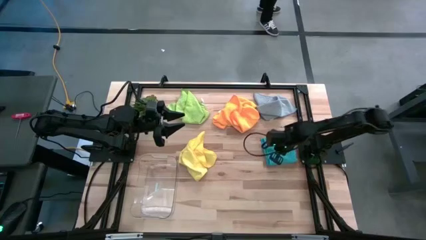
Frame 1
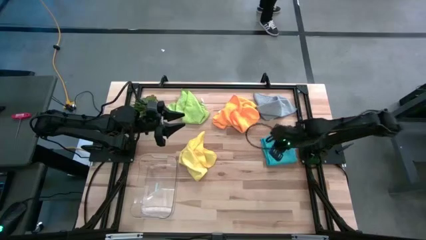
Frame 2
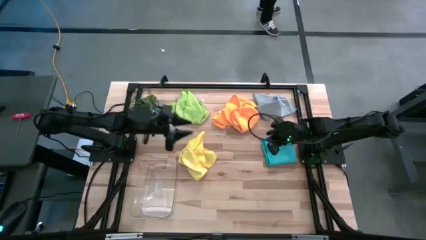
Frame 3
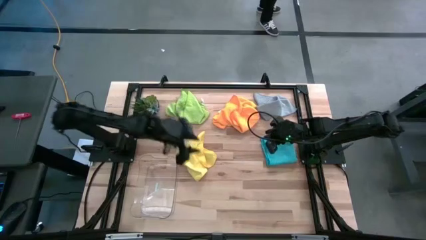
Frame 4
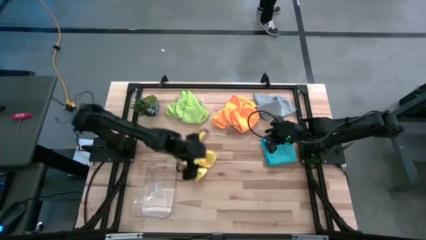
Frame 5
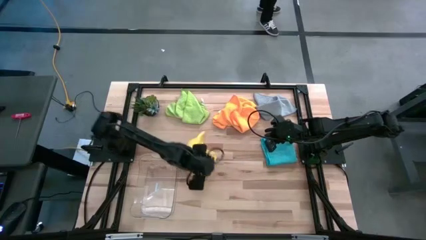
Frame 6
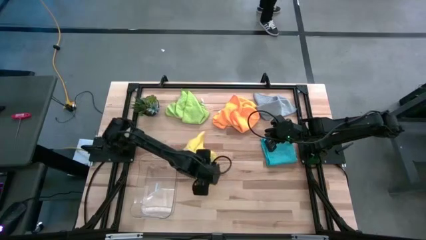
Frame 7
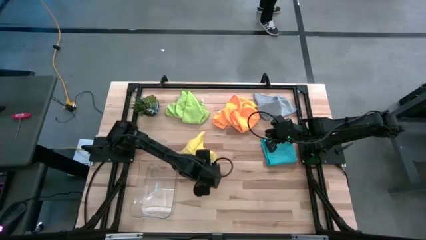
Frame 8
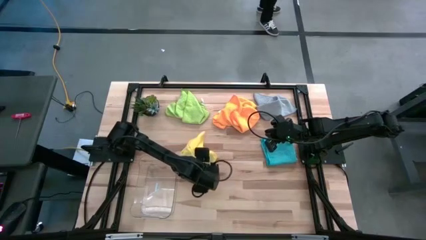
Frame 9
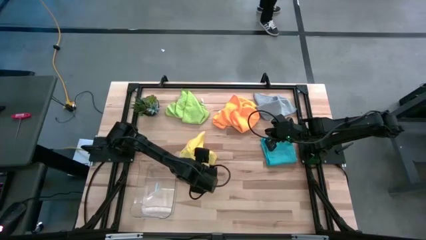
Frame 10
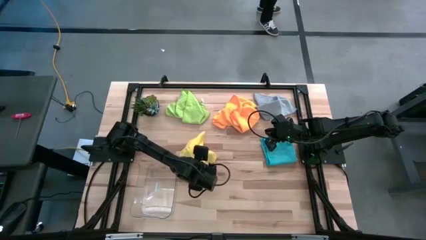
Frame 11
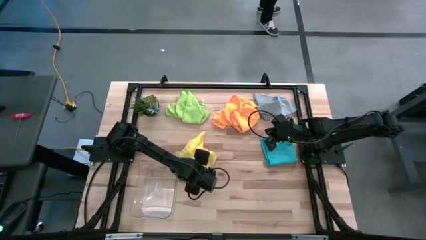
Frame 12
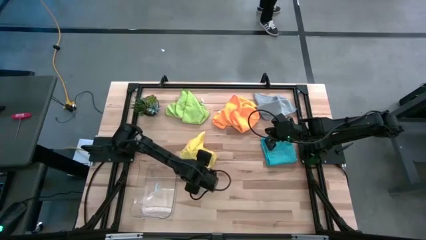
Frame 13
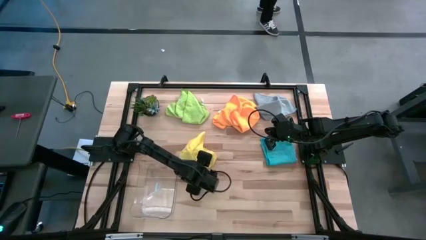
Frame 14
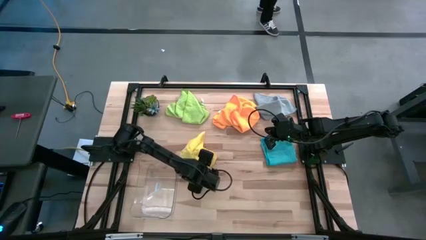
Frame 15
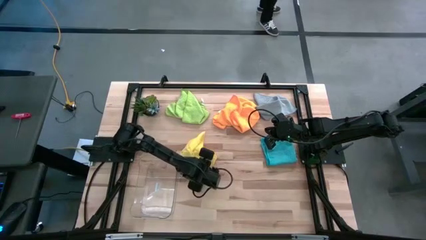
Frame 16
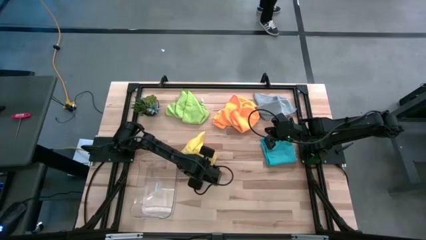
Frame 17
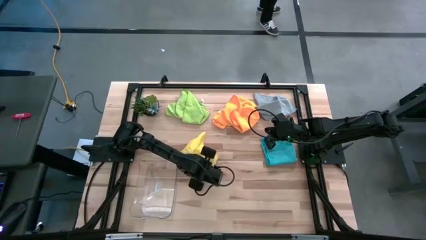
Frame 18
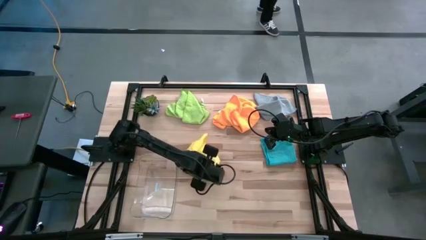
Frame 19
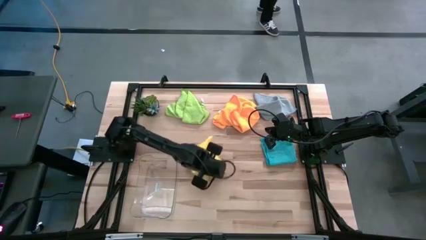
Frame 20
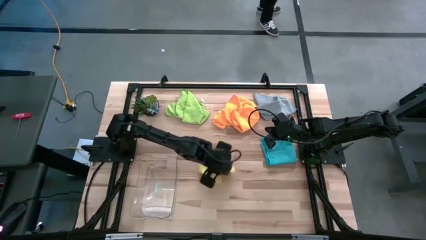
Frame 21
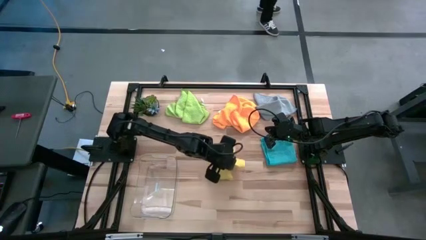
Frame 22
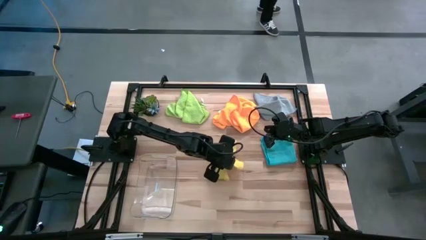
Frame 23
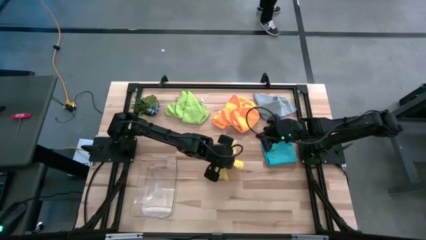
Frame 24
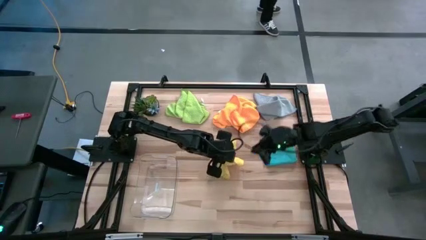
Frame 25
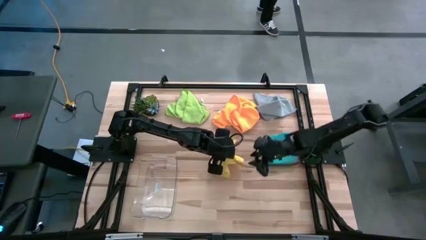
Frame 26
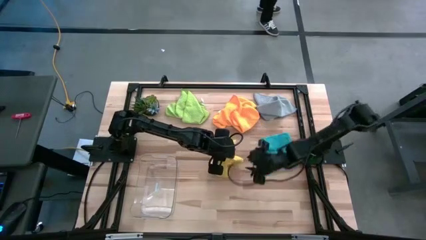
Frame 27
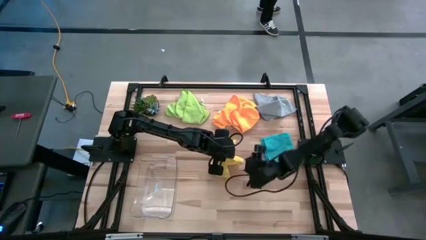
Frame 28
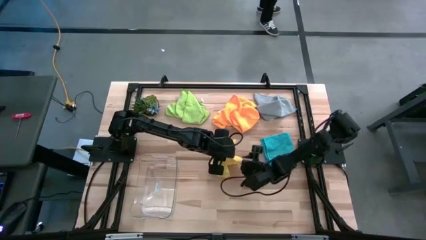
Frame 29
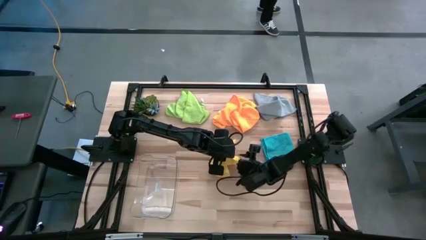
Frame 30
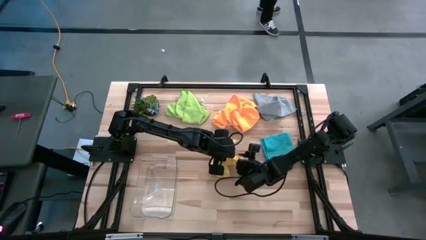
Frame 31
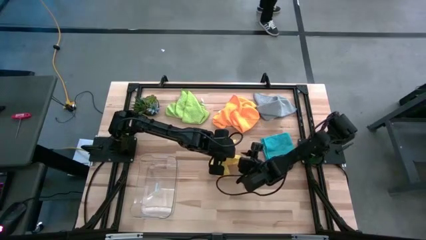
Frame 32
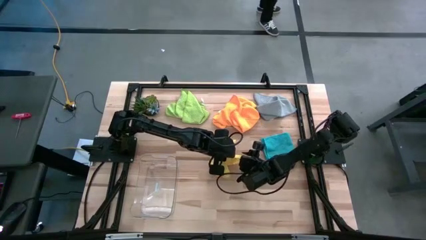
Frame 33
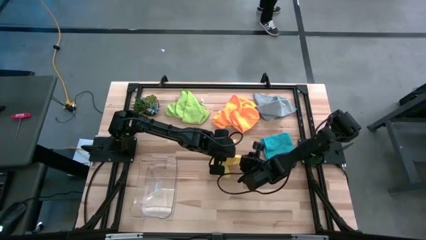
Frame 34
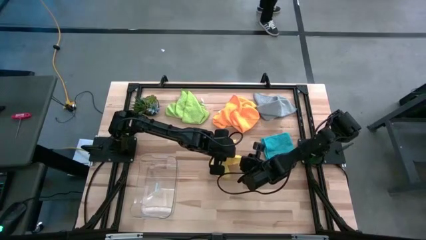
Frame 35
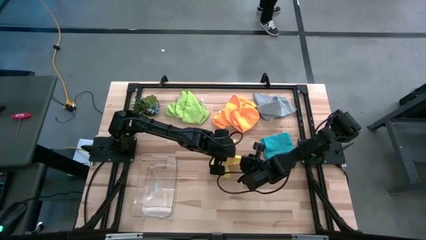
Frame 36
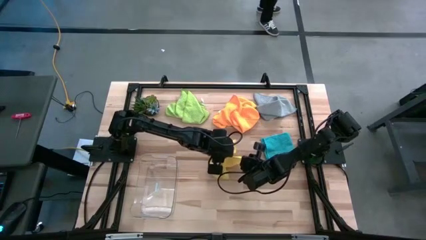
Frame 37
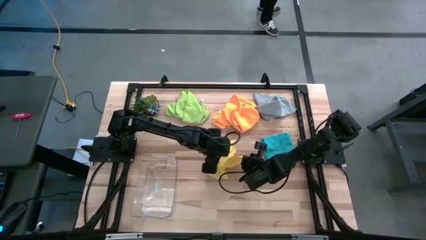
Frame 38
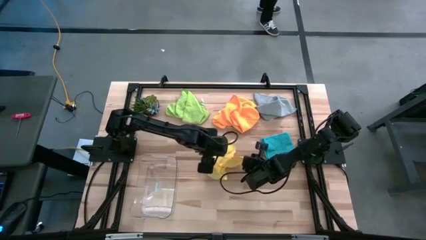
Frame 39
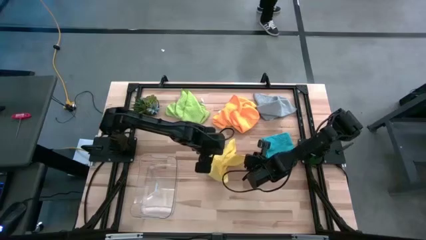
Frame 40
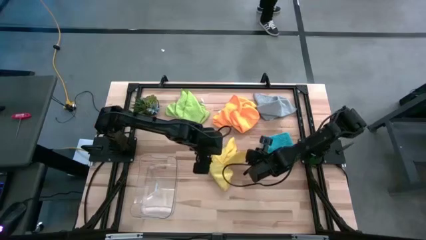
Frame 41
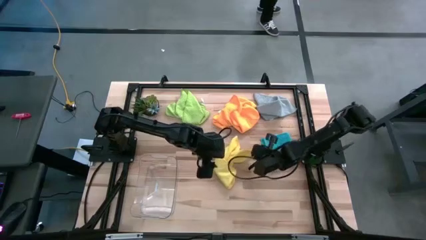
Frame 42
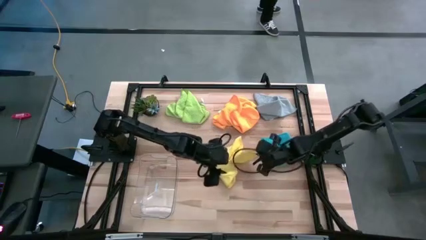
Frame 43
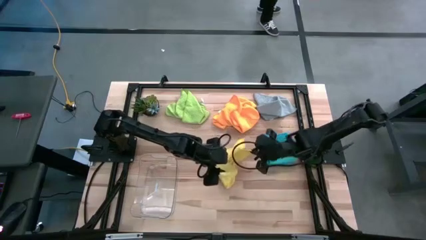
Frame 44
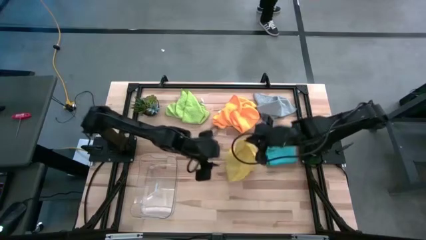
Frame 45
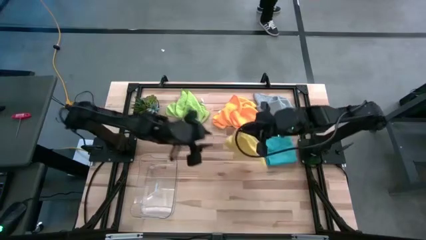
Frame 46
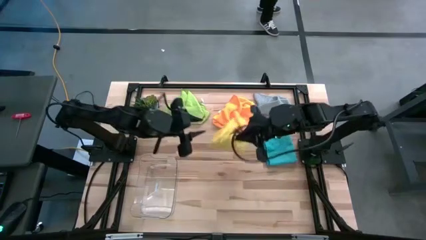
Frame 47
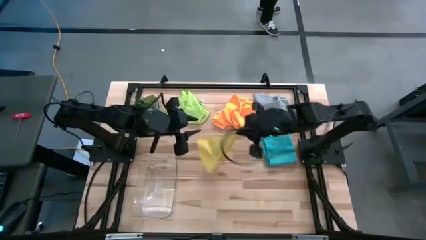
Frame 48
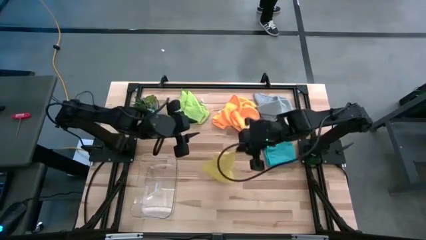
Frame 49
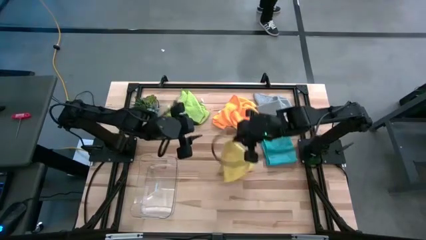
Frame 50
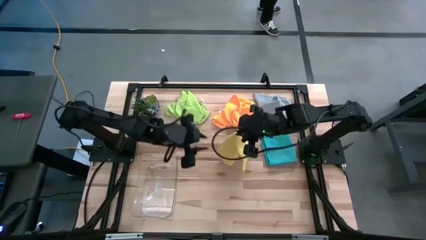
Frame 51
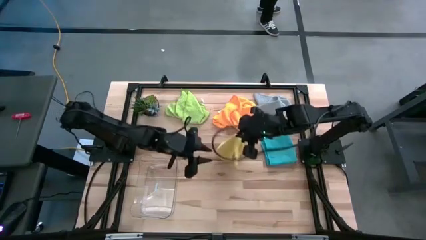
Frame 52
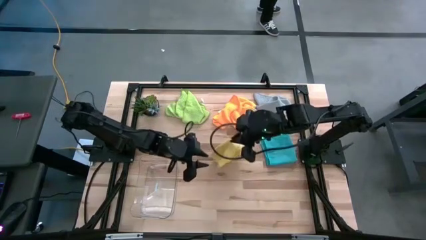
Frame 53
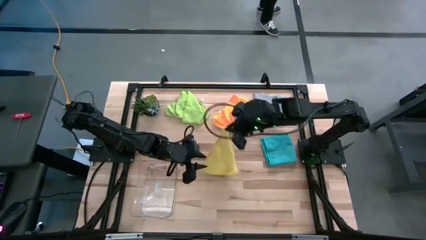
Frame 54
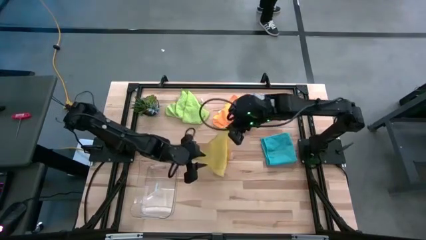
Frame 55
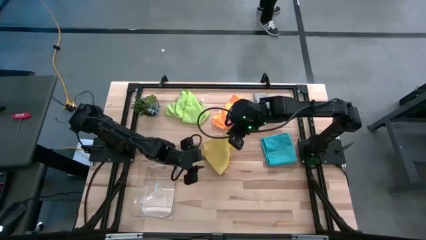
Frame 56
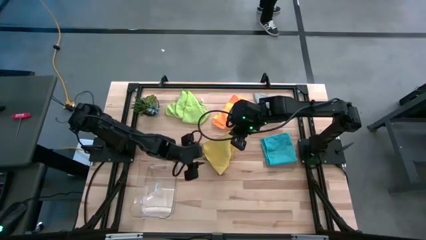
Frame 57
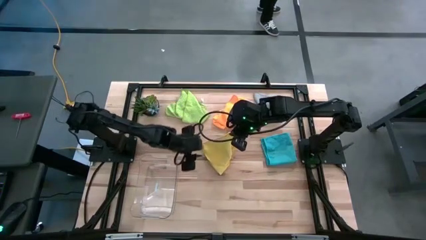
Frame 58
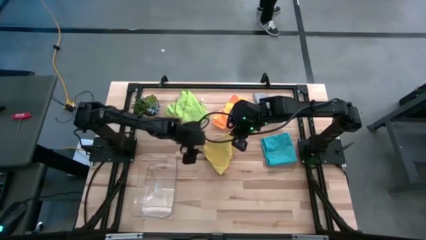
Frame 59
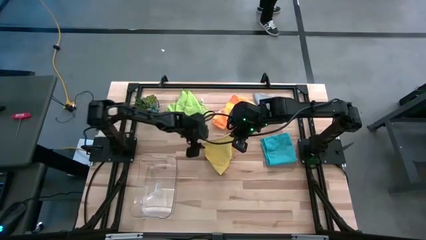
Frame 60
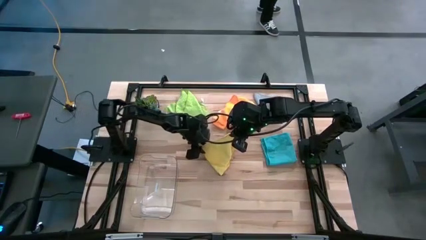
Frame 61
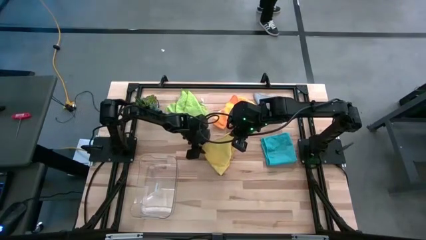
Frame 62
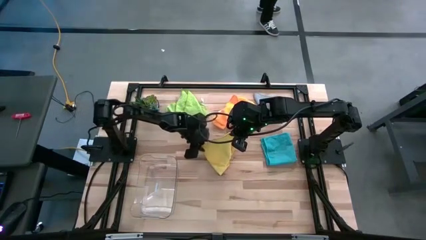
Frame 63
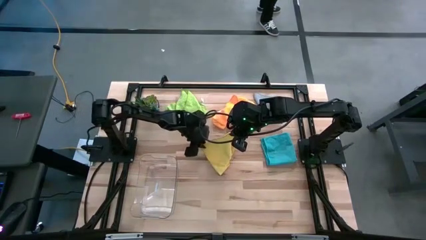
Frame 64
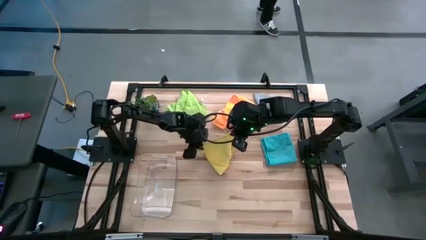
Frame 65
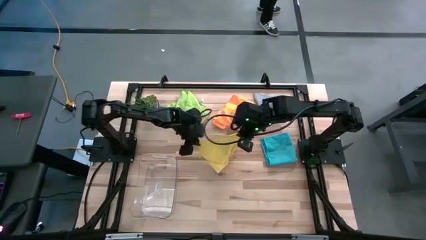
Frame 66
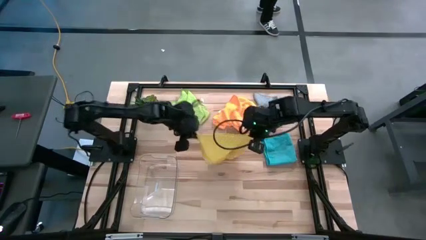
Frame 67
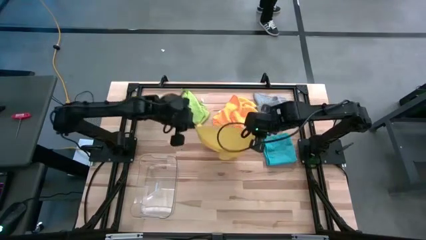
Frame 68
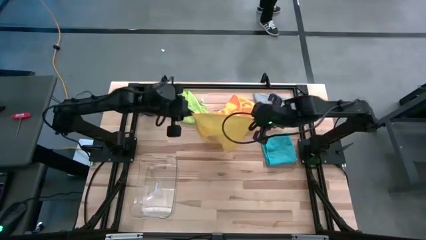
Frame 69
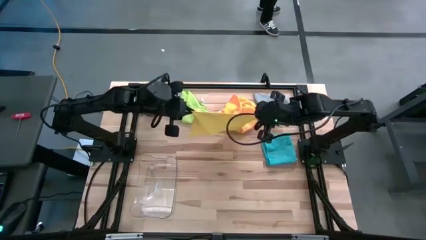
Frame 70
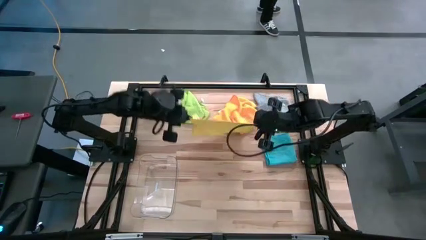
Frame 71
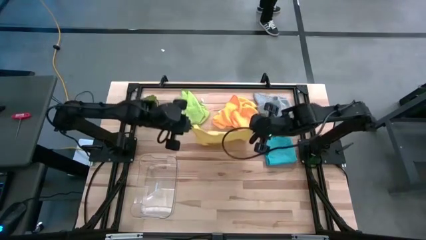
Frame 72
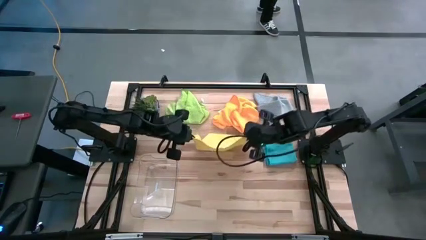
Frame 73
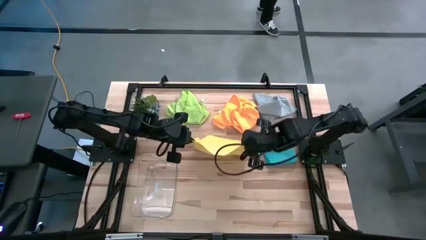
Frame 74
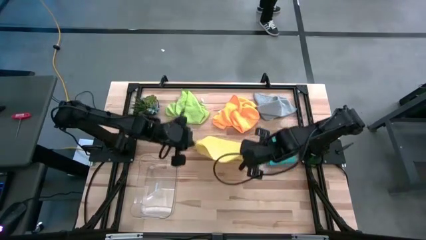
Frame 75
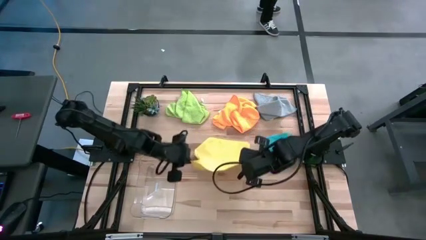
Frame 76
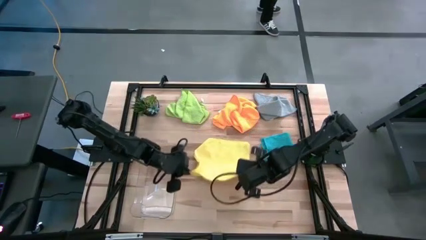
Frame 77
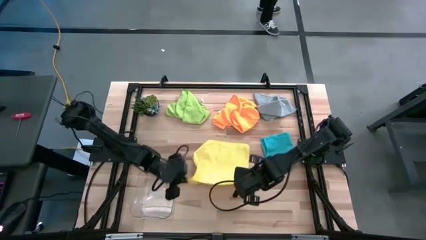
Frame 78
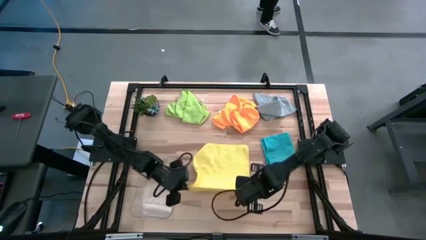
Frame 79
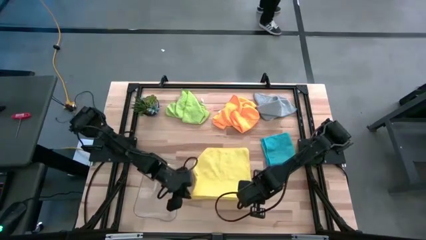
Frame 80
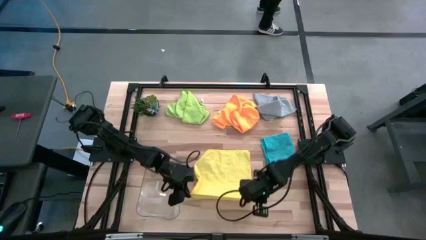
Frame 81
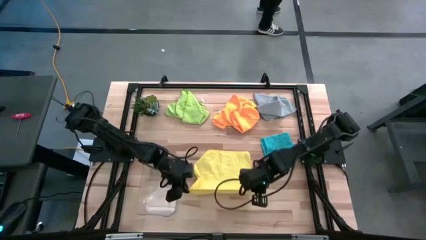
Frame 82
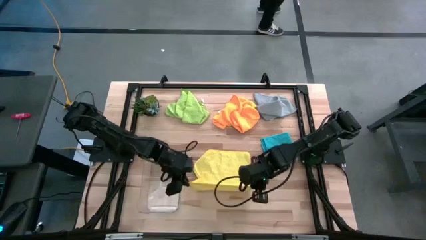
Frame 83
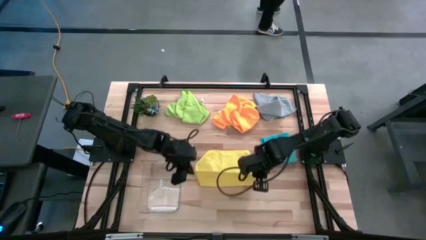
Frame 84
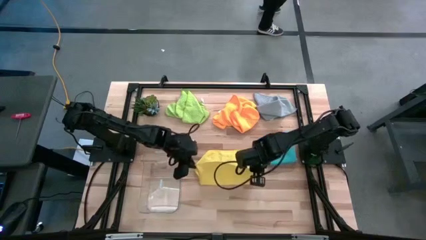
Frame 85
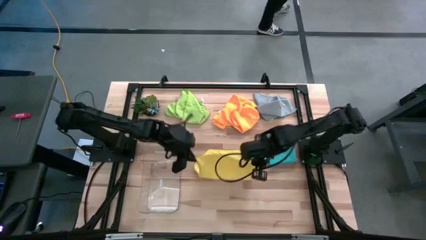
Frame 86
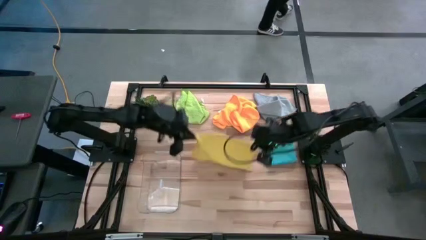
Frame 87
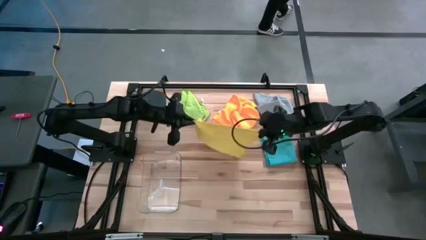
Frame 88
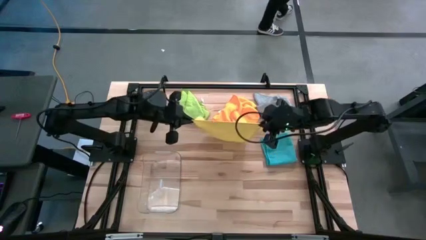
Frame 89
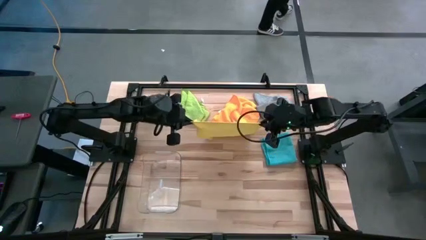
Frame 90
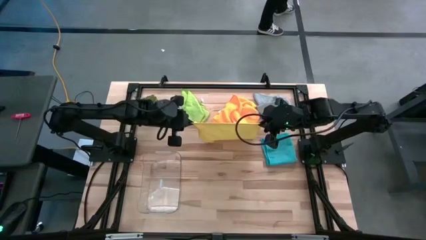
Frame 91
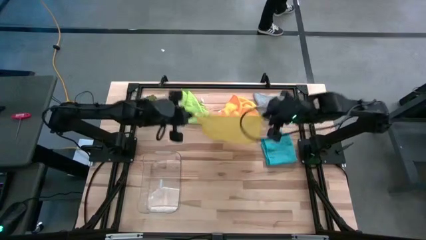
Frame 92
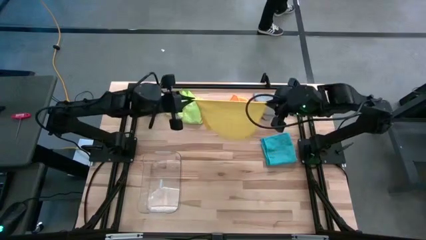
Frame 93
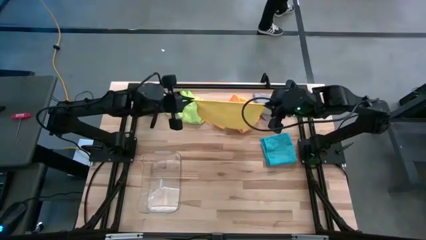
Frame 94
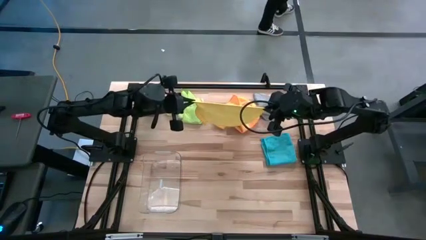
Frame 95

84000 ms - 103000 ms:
Task: Fold microfiber towels
Fold the yellow towel
